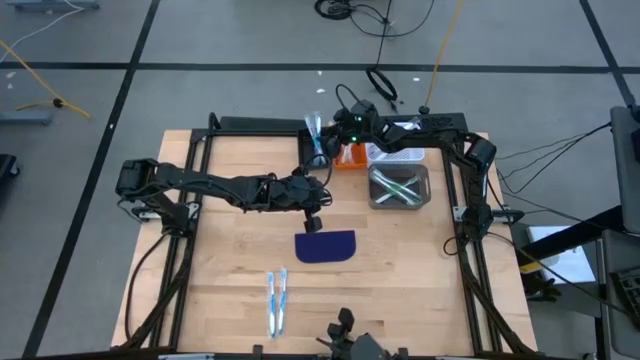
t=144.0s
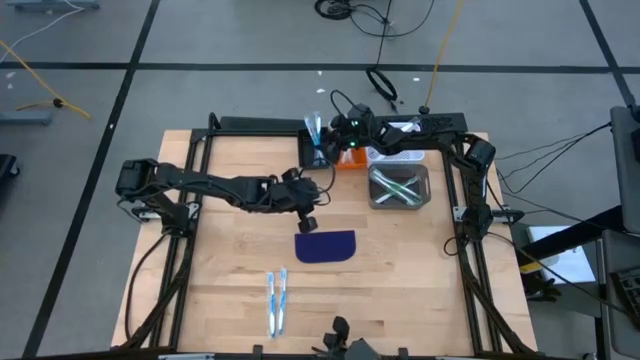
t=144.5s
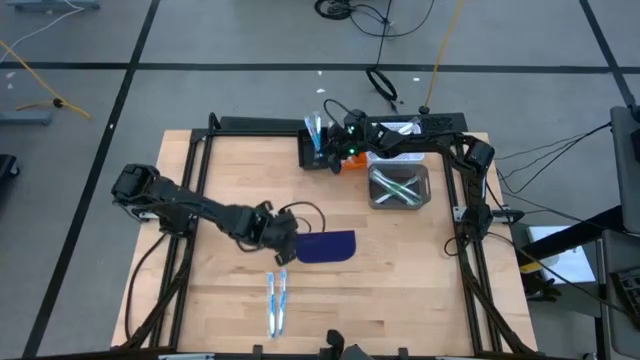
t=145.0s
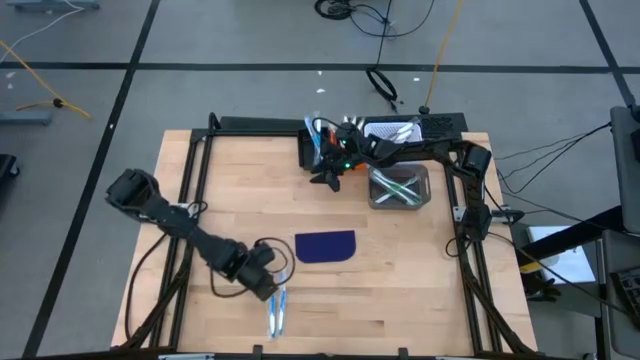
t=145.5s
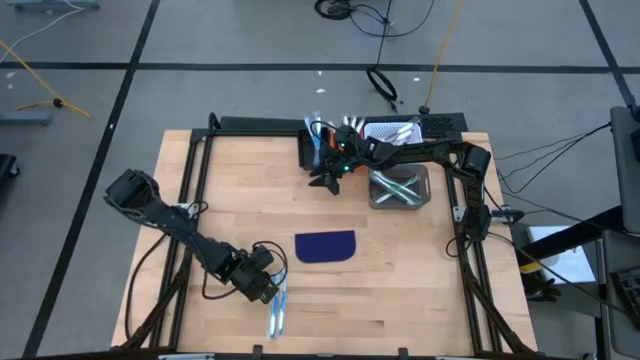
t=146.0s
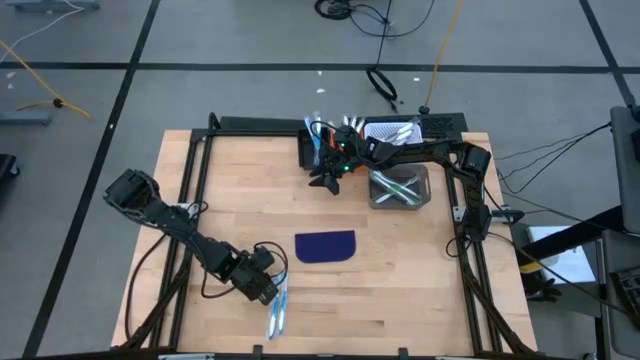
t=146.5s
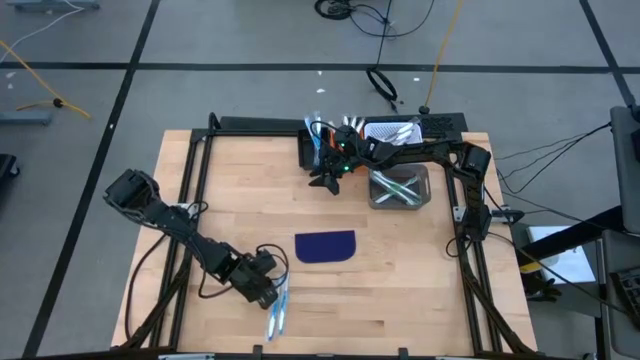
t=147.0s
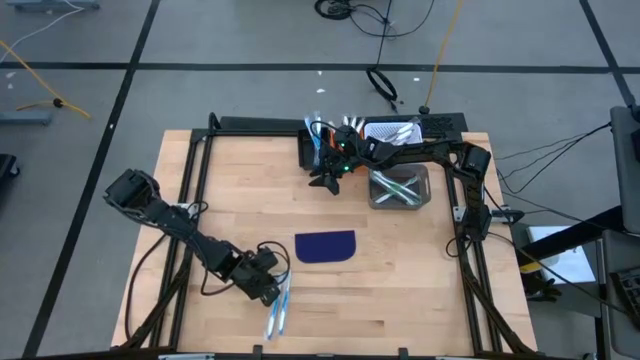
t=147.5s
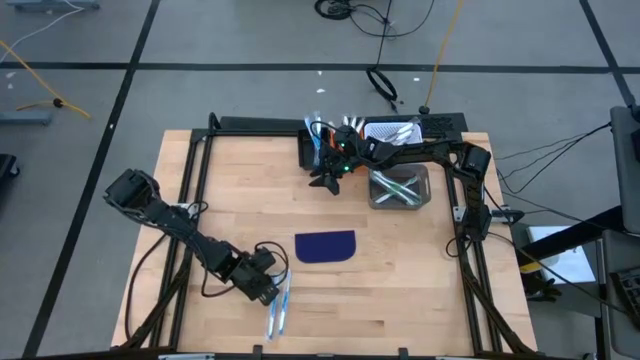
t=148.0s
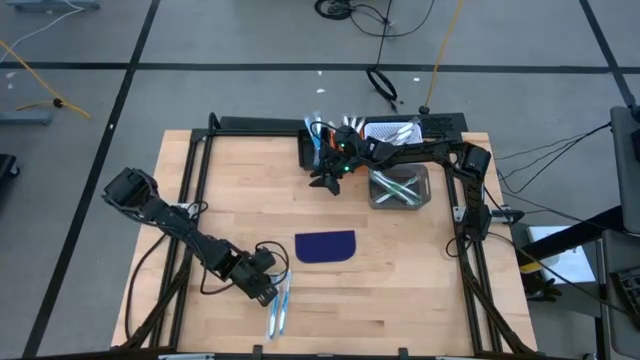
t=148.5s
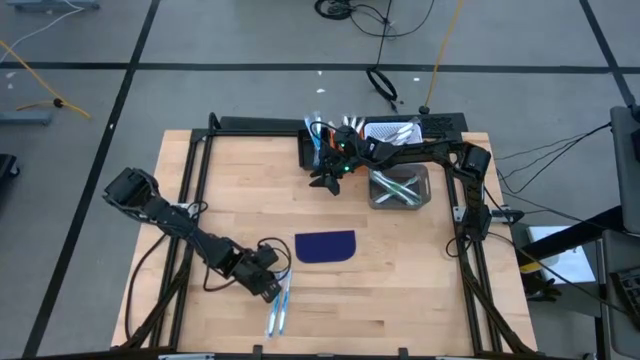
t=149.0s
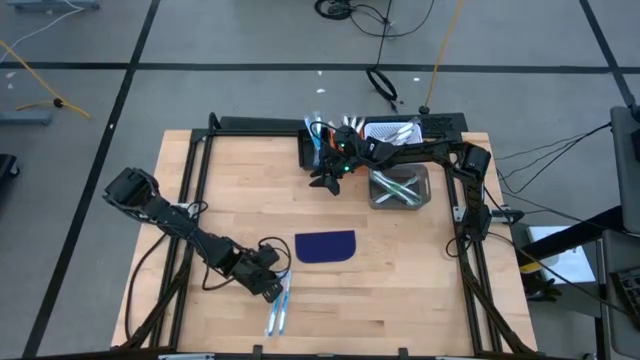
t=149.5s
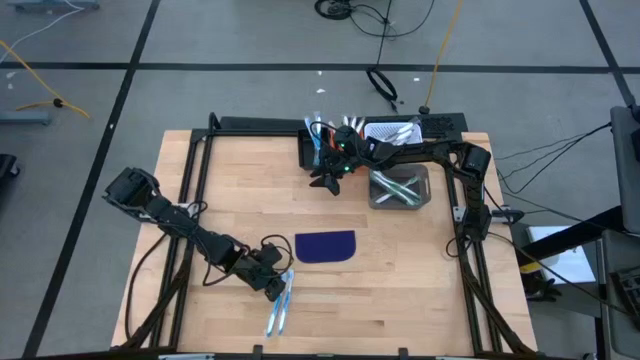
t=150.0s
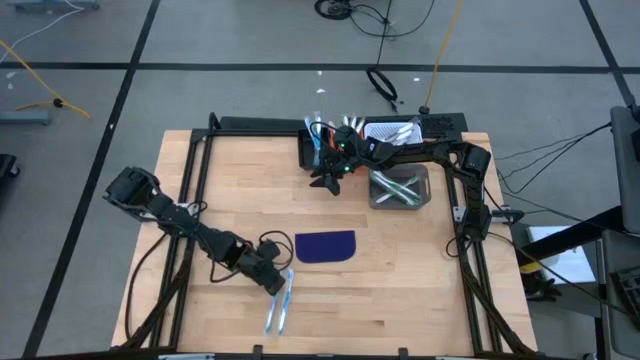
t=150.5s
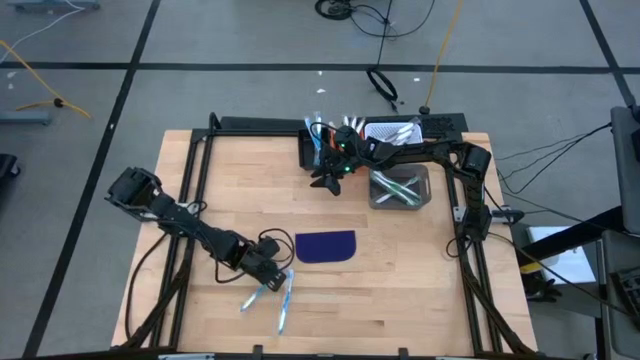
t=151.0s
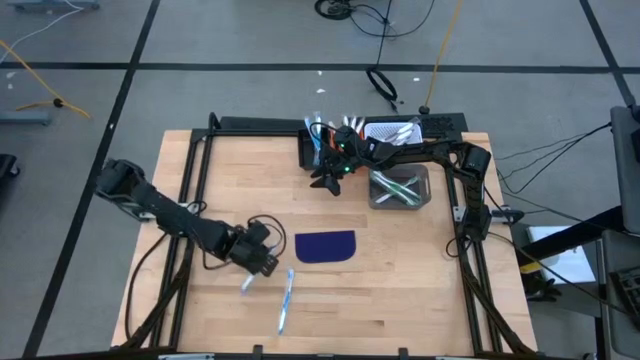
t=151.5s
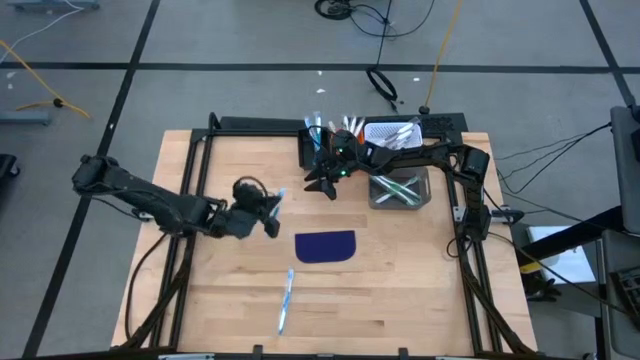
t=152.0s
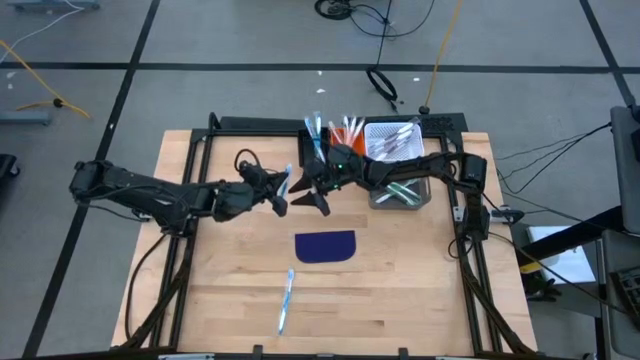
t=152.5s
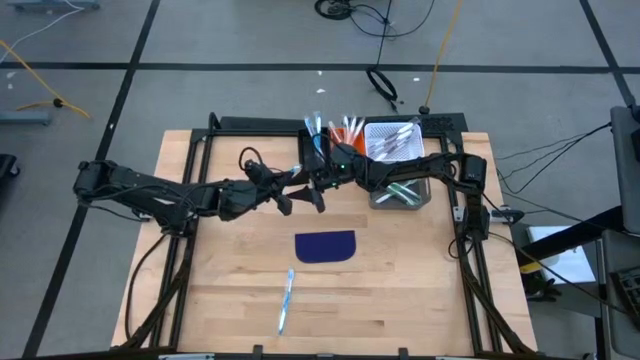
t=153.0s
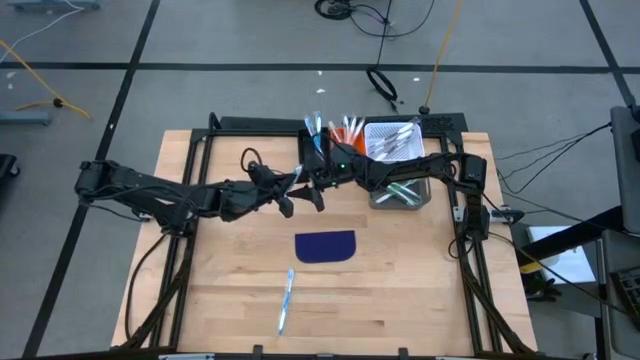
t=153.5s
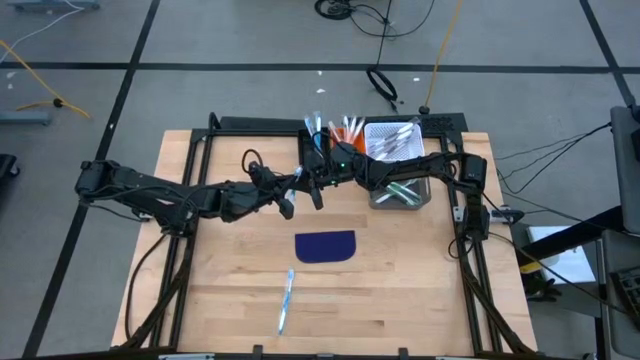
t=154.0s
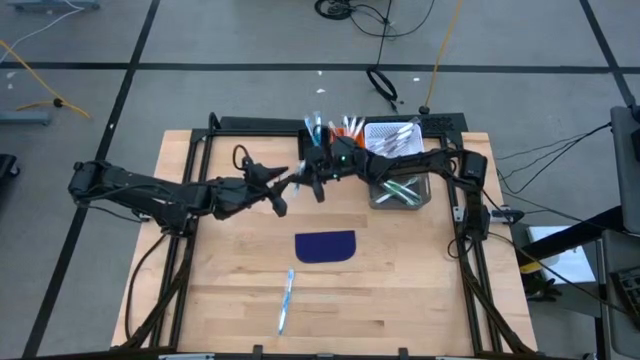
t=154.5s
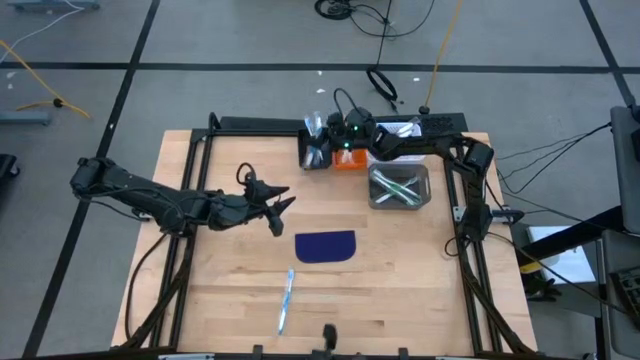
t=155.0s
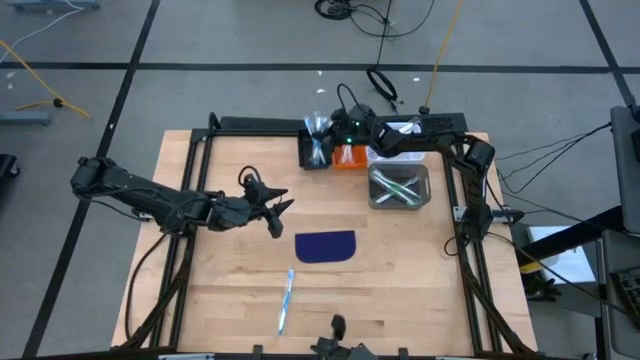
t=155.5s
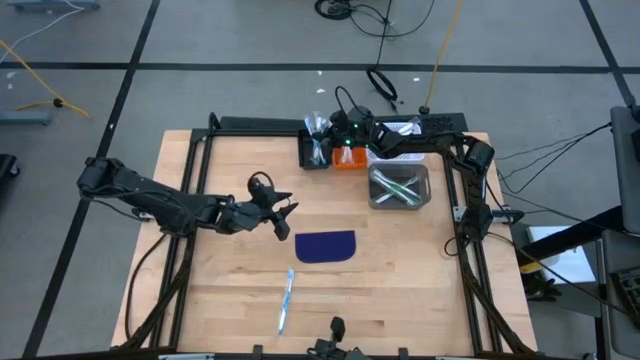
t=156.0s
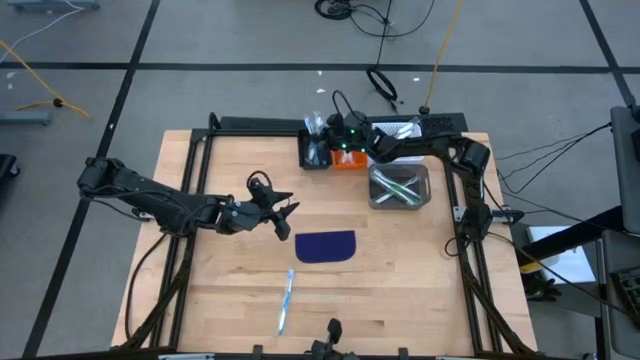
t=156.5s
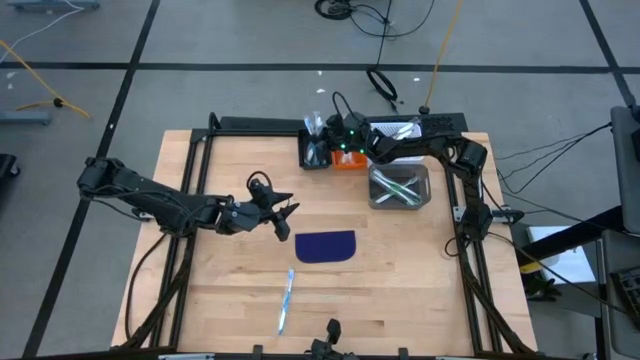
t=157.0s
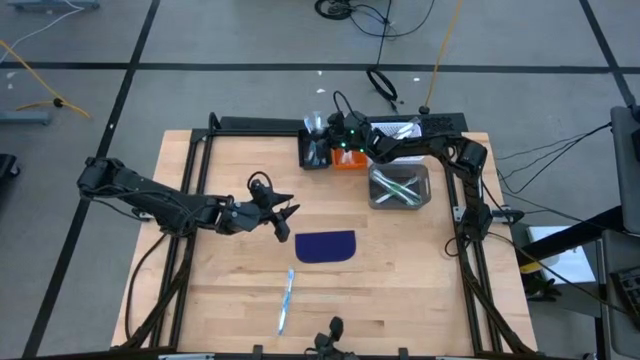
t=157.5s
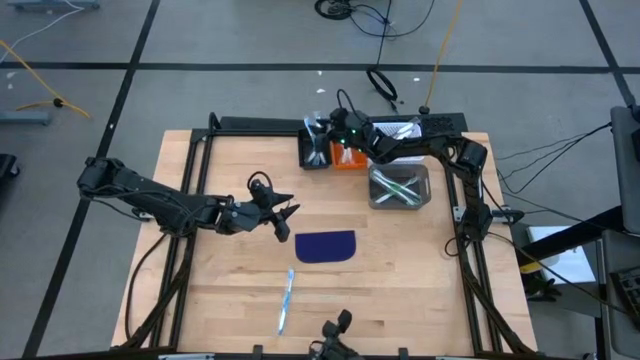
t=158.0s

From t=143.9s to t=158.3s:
Task: Pick & Place Toothbrushes
Put the blue toothbrush into the black bin

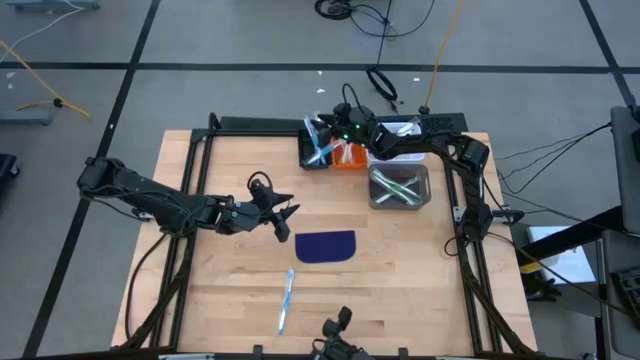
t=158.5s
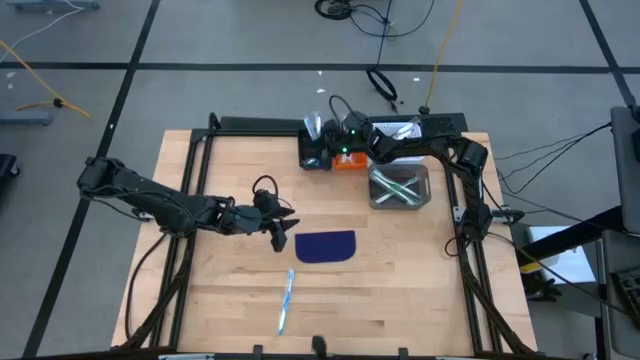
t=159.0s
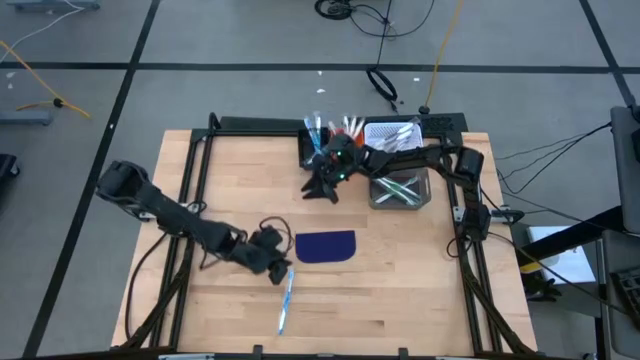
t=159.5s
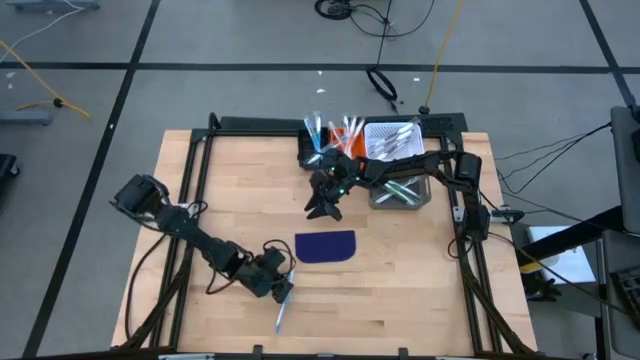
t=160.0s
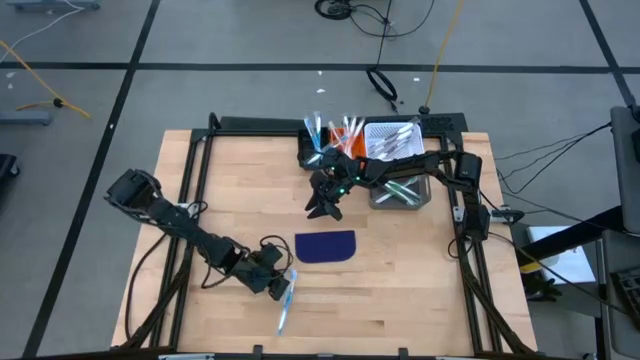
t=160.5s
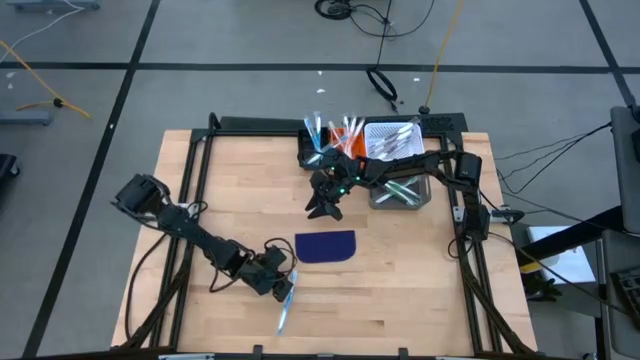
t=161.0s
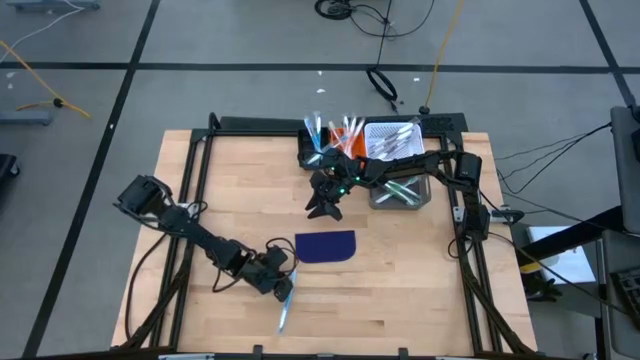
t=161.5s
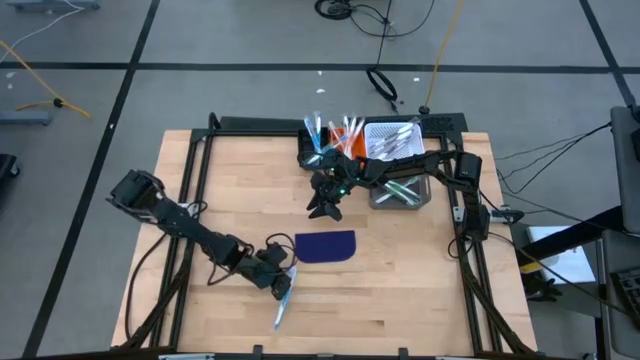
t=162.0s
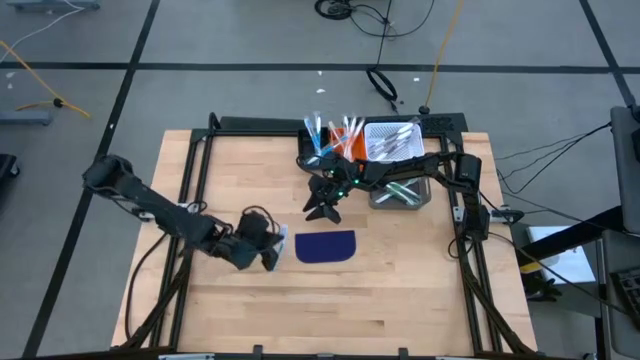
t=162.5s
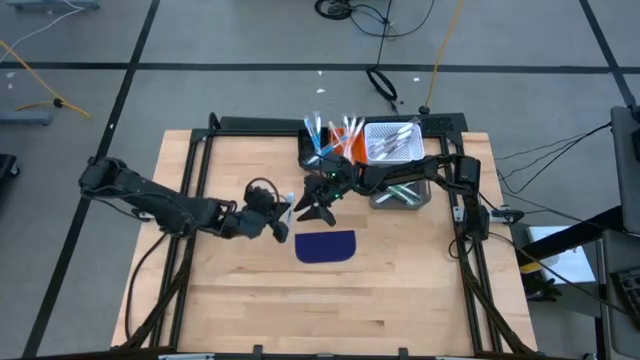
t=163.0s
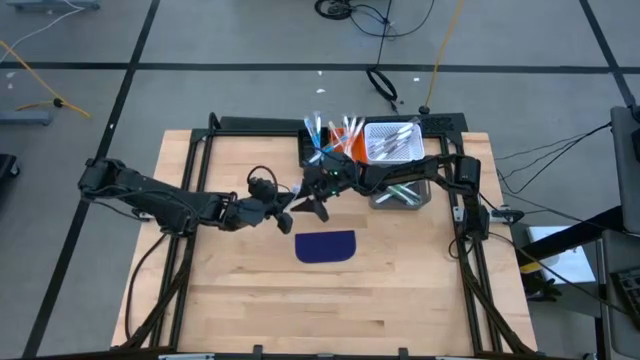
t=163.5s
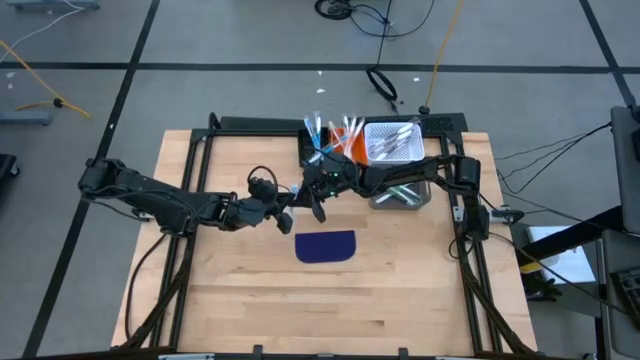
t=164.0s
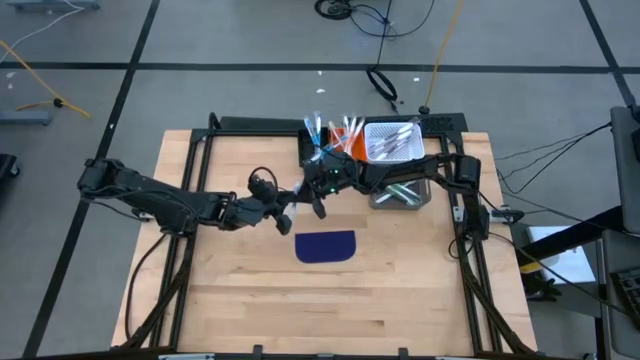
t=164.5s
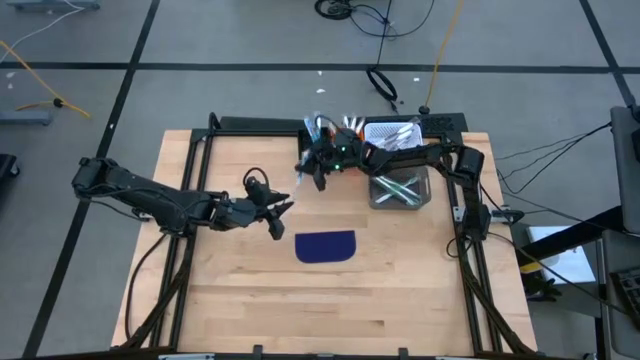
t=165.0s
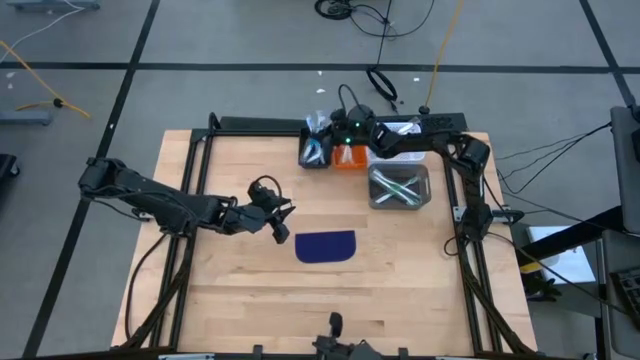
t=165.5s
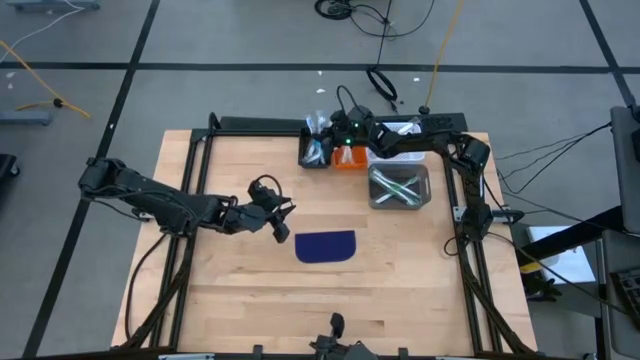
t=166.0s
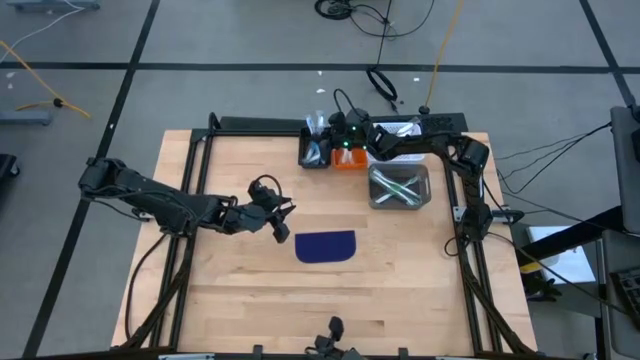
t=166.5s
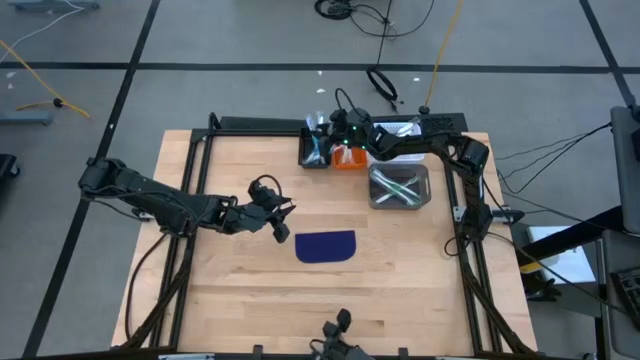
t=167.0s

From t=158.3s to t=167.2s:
Put the blue toothbrush into the black bin
